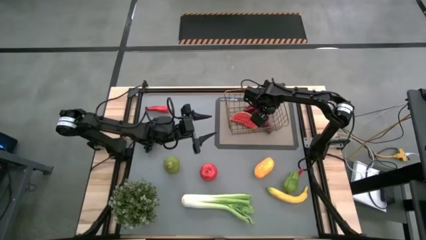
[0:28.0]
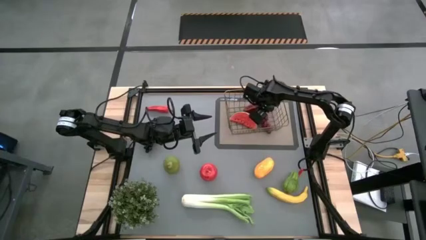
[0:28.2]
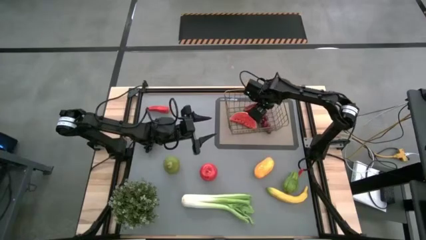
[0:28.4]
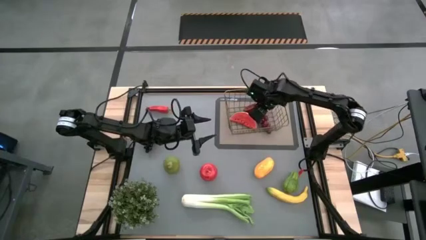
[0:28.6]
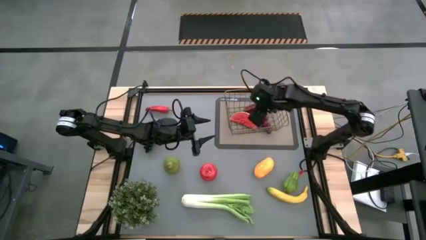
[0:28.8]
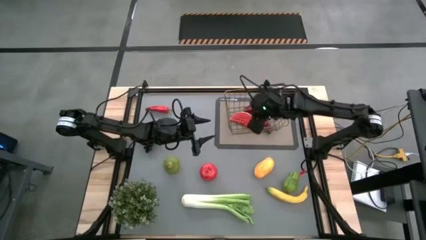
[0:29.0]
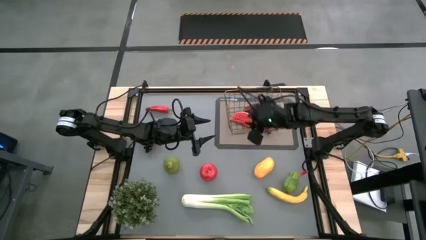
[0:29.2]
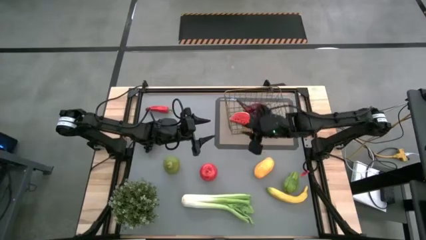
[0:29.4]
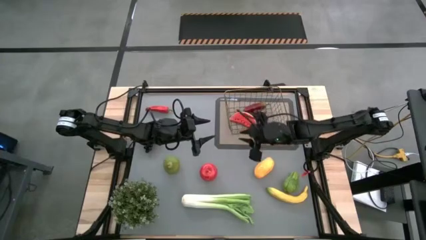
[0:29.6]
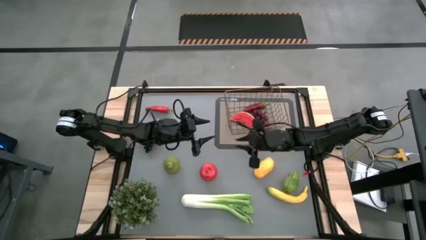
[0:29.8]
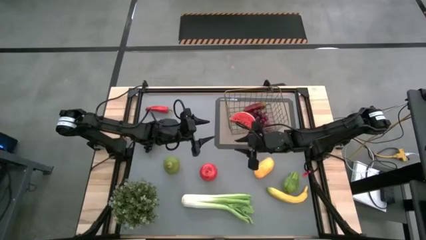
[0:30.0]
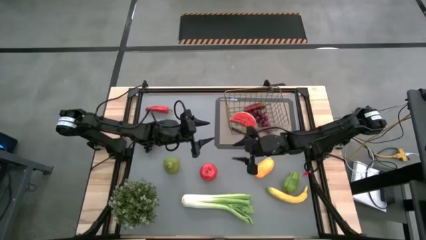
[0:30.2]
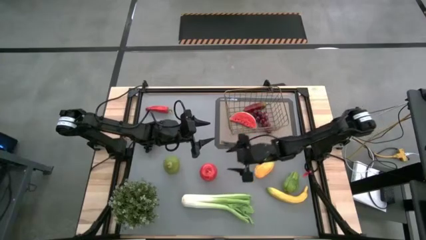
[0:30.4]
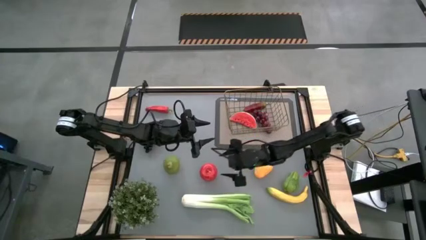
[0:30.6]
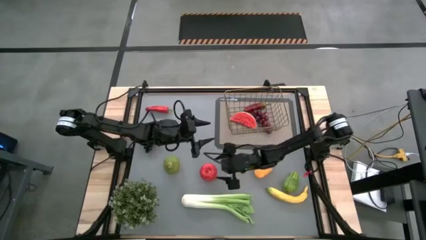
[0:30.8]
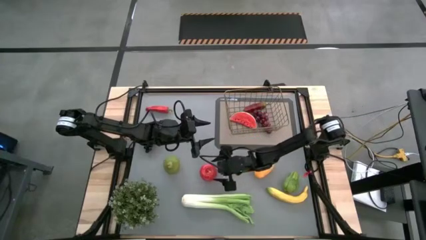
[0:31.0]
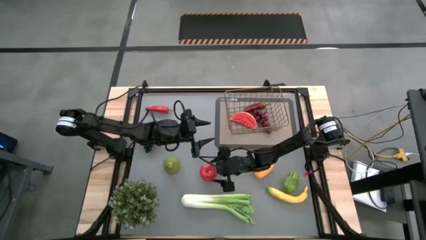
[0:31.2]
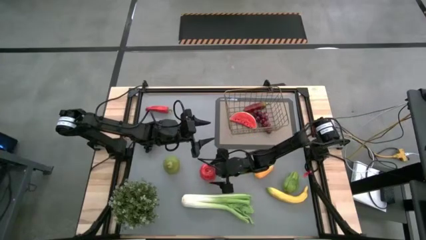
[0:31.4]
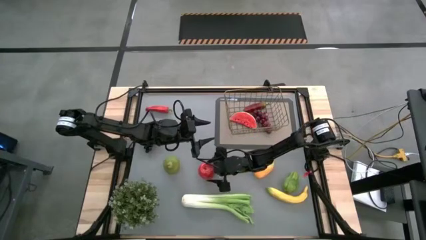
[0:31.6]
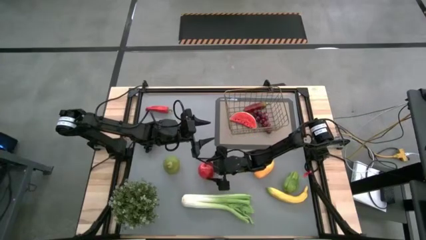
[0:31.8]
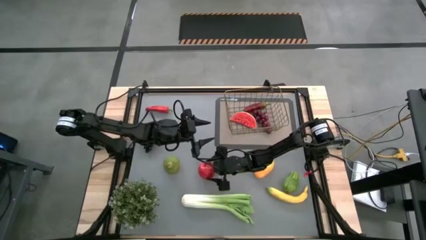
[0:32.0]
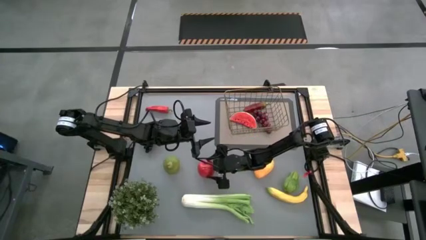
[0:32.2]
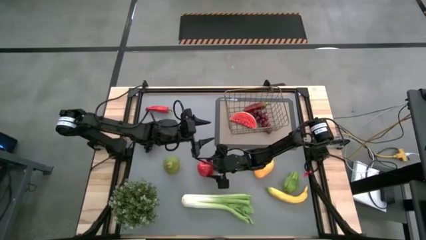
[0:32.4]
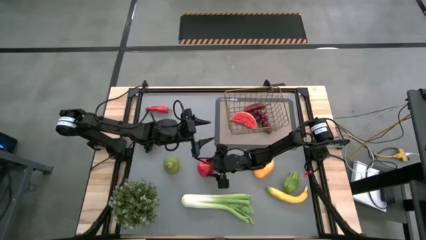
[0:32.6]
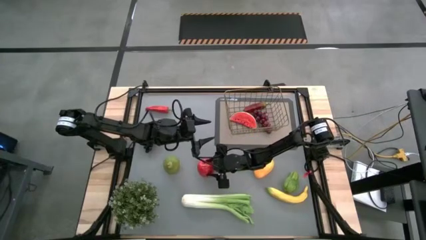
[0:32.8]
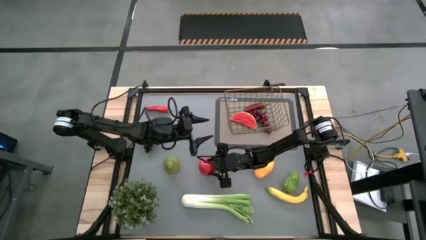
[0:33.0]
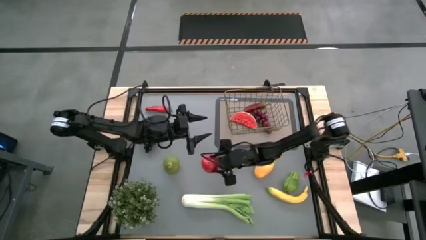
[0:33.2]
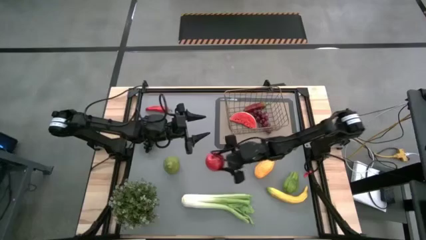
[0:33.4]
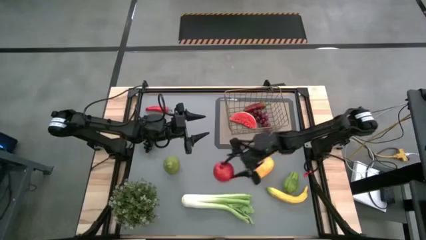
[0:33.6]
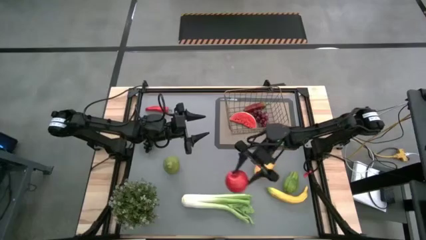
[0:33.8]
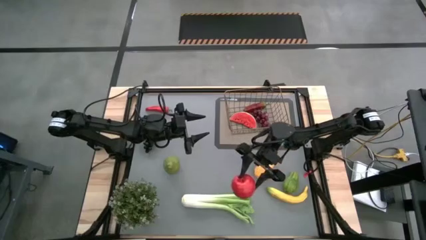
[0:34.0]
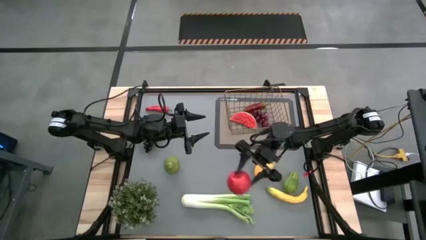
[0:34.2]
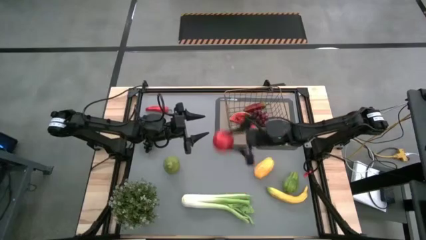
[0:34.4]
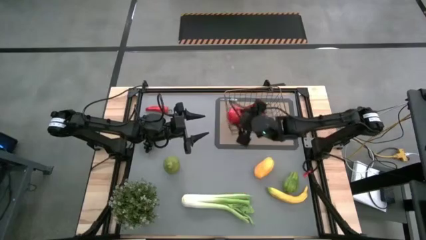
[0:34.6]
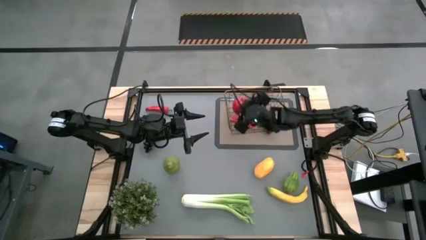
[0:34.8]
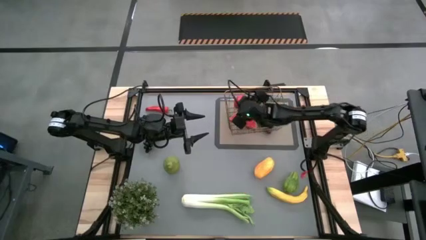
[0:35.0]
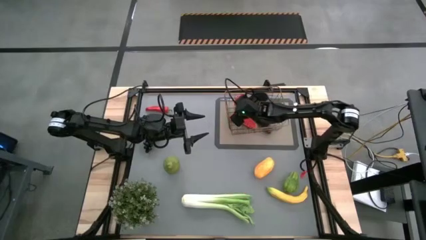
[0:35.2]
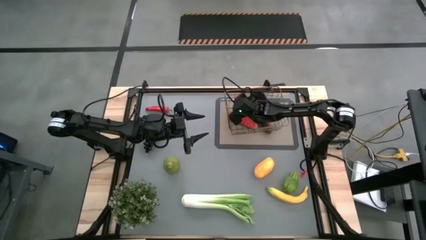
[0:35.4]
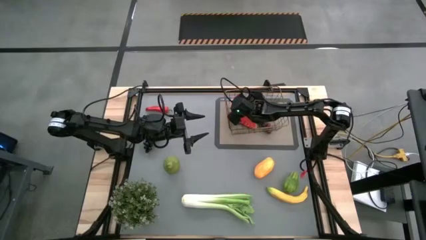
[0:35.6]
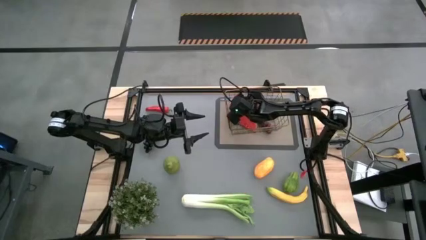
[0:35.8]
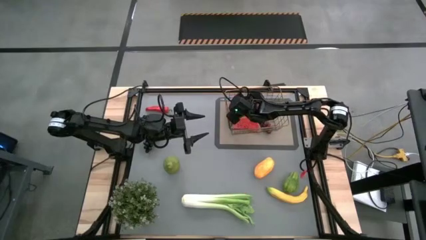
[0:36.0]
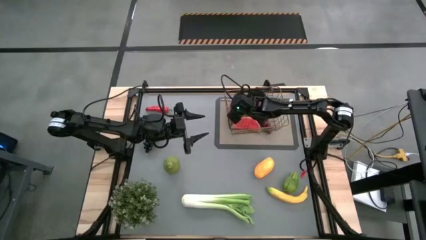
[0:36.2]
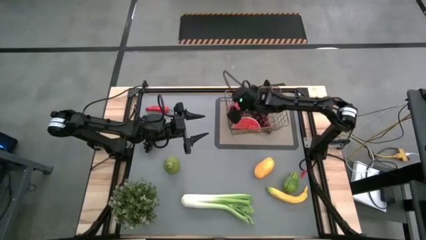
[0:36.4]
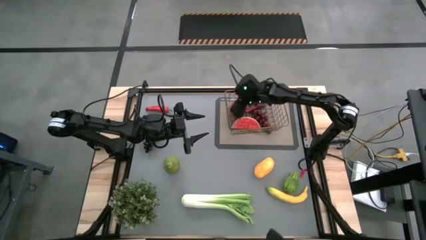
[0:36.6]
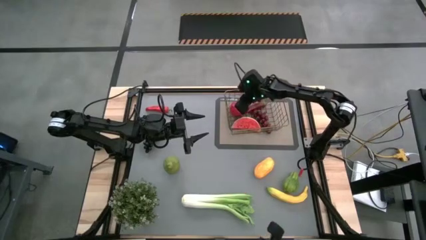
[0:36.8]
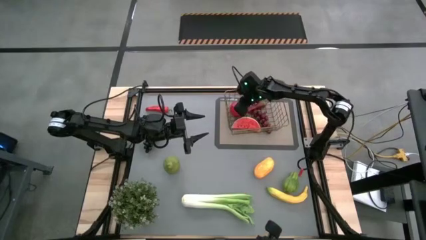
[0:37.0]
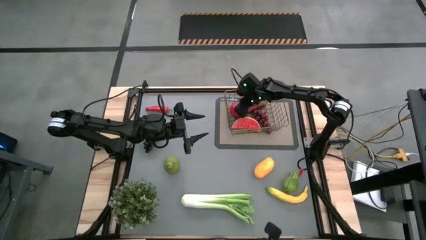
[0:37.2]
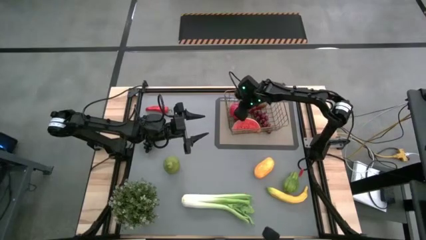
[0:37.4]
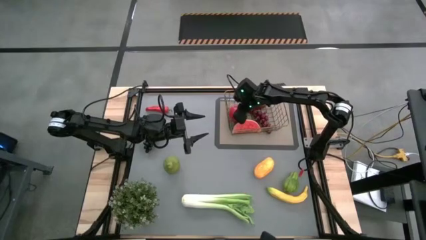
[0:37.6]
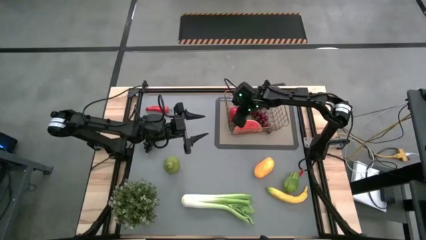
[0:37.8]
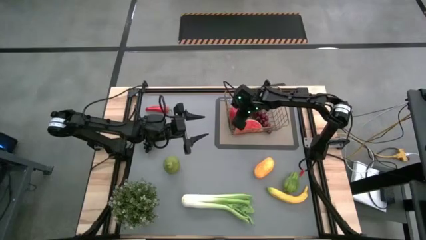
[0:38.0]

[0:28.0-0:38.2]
Task: Build produce basket
Put the apple into the wire basket

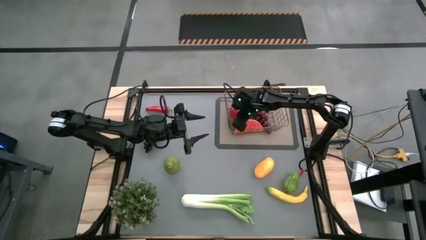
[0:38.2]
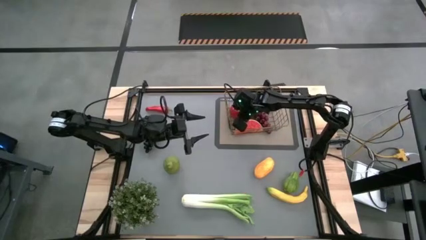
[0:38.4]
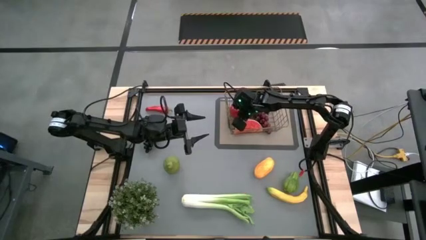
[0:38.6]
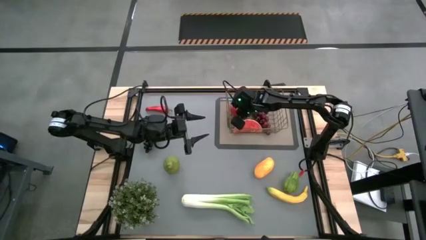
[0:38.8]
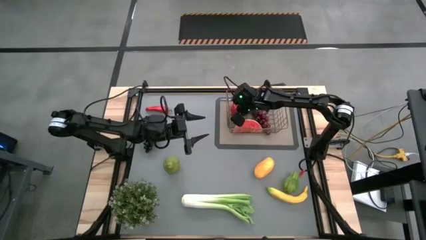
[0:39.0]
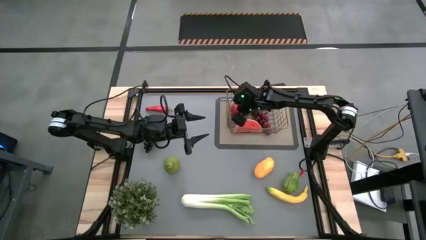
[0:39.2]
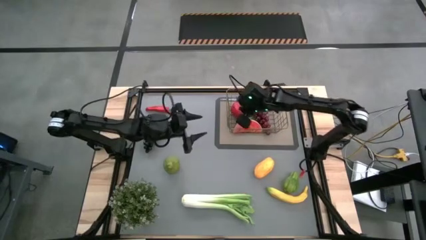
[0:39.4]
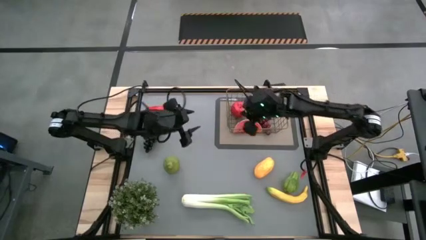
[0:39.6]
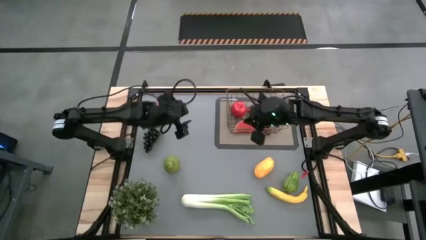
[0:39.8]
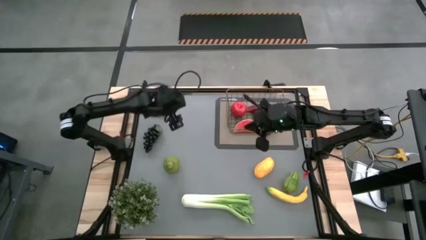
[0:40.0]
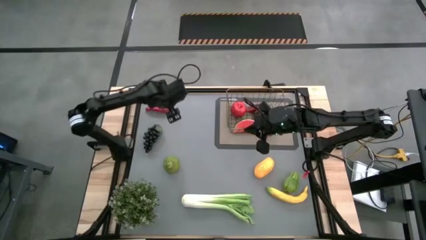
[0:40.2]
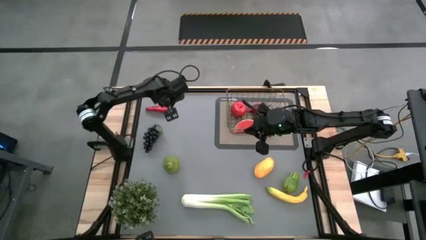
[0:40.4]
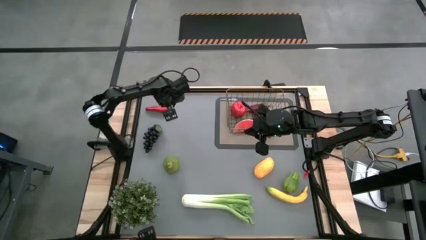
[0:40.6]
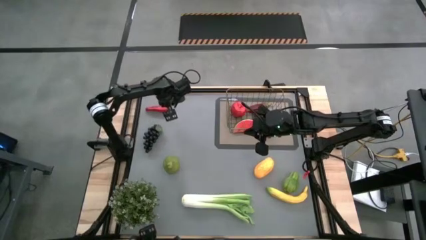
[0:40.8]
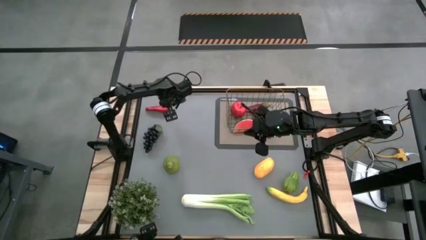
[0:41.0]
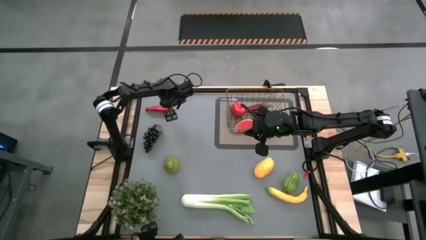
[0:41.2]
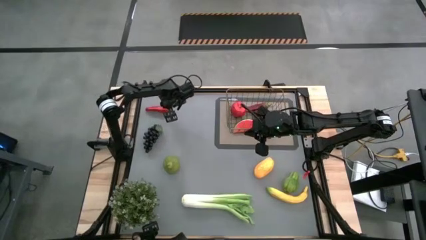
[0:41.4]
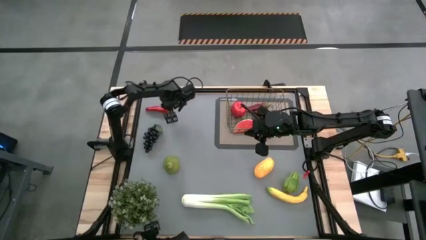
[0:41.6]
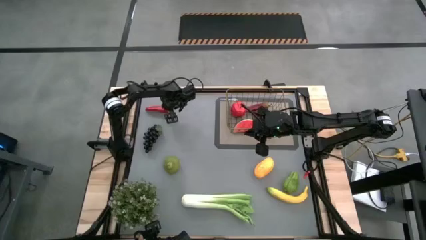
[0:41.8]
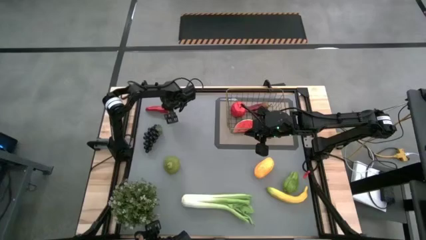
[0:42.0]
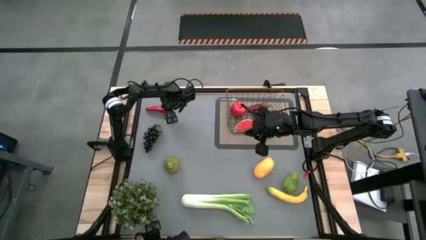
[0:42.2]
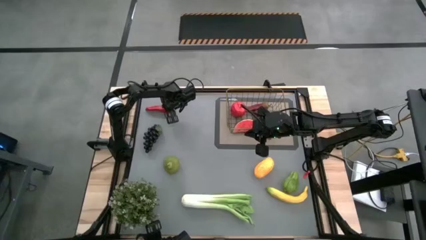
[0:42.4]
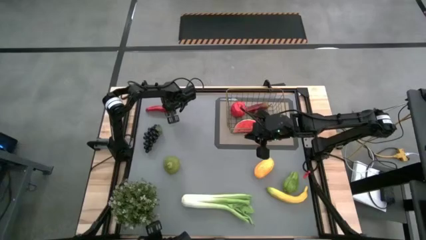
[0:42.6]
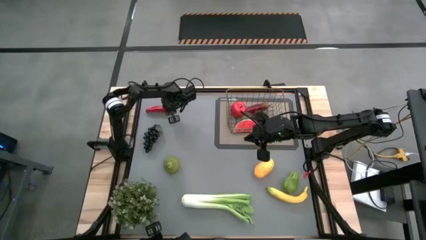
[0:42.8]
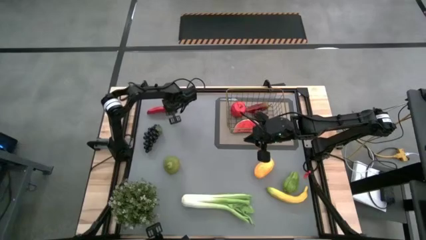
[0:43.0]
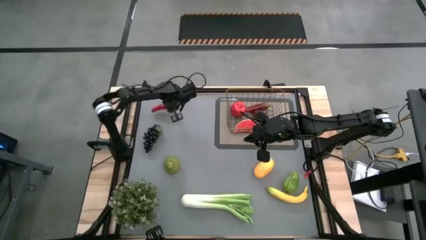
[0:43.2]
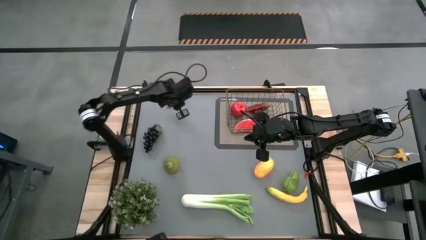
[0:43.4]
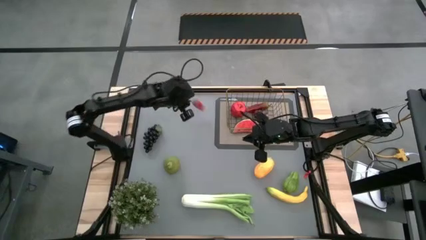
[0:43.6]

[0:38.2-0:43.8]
Put the chili pepper into the wire basket
